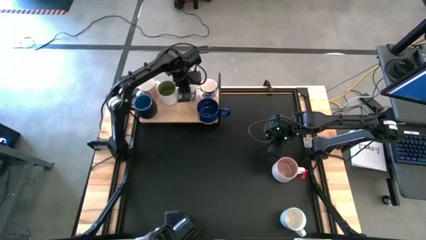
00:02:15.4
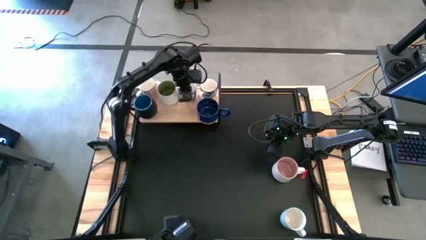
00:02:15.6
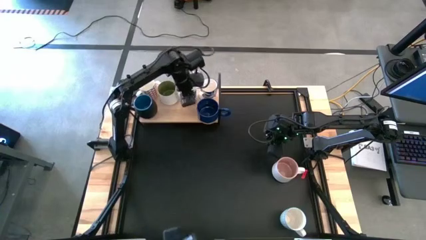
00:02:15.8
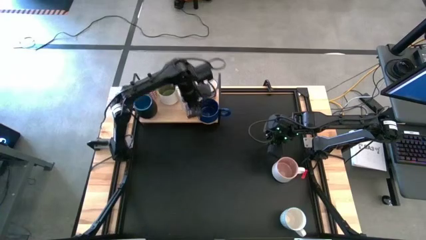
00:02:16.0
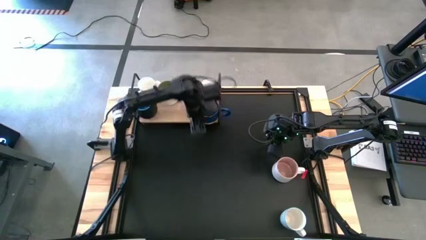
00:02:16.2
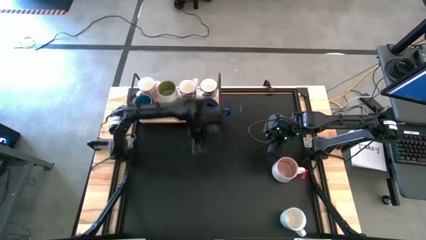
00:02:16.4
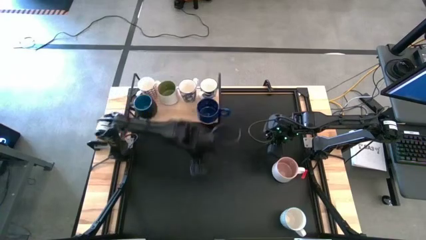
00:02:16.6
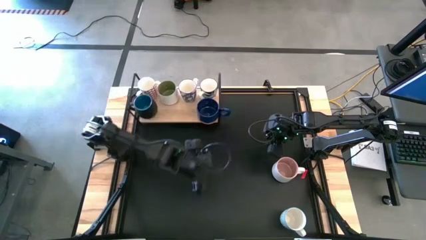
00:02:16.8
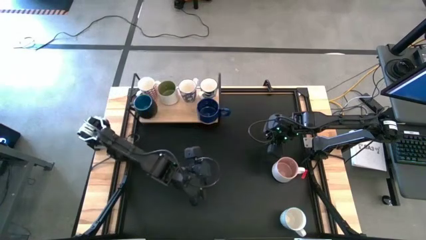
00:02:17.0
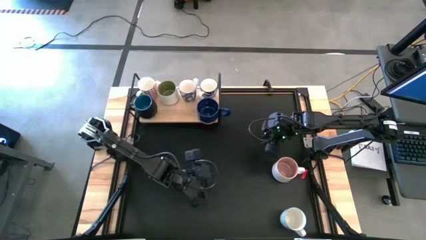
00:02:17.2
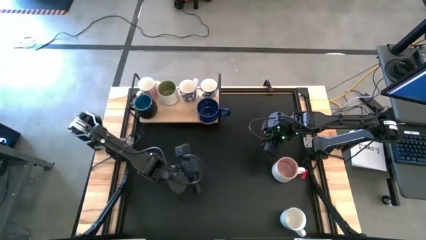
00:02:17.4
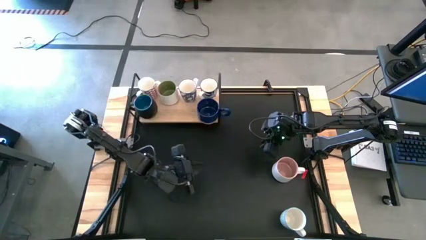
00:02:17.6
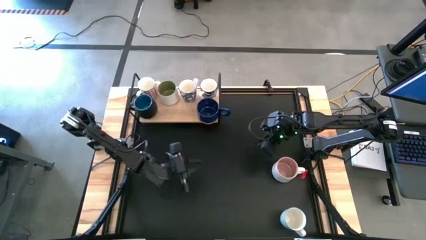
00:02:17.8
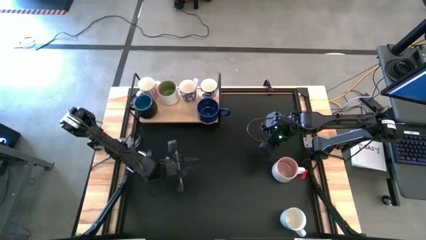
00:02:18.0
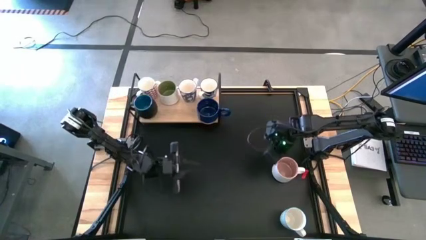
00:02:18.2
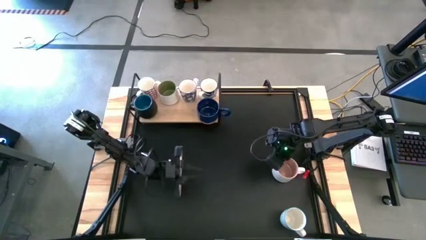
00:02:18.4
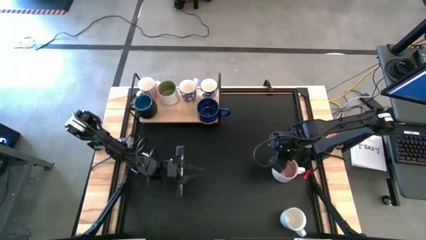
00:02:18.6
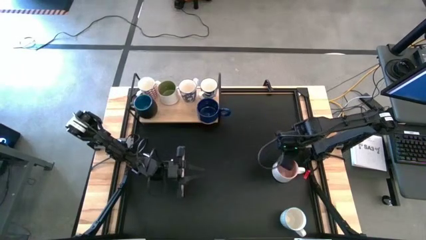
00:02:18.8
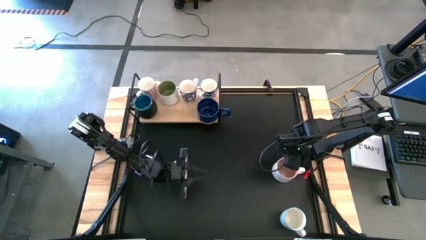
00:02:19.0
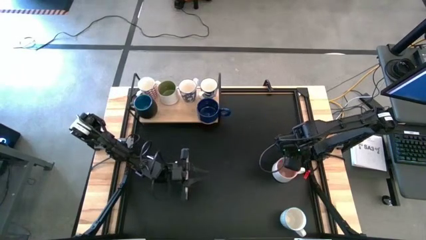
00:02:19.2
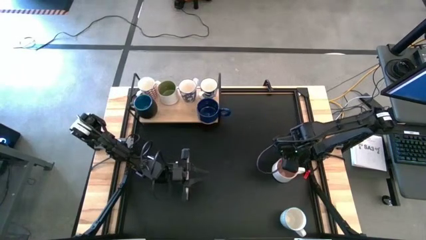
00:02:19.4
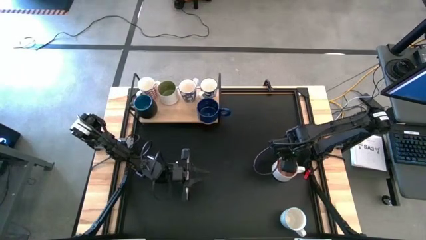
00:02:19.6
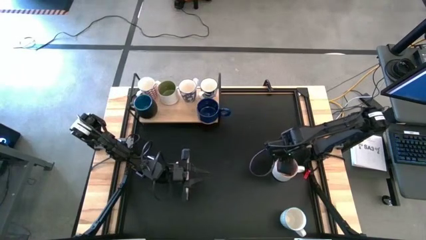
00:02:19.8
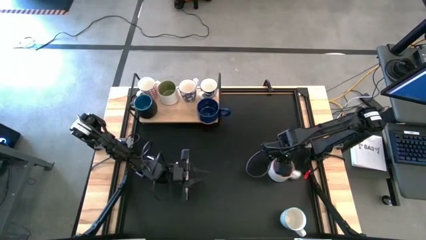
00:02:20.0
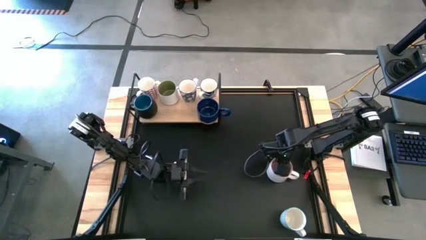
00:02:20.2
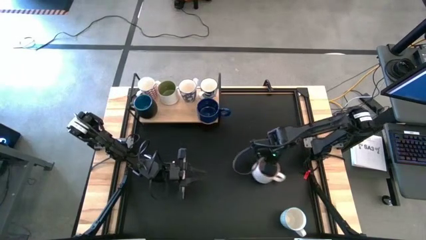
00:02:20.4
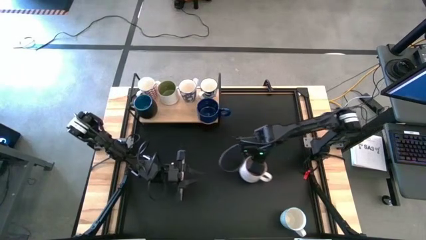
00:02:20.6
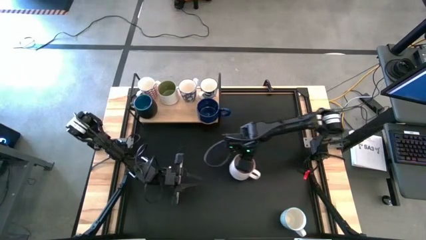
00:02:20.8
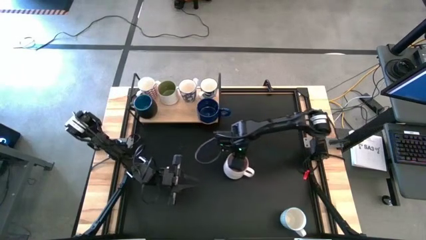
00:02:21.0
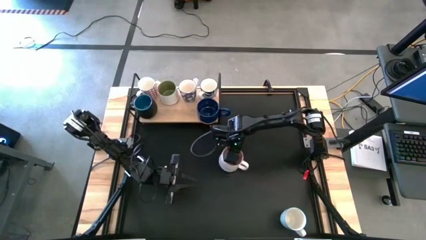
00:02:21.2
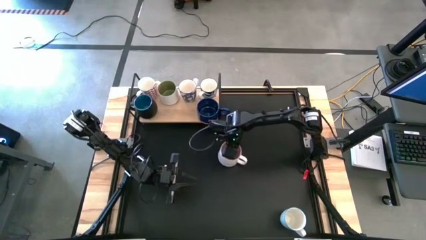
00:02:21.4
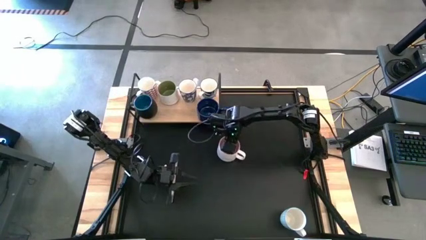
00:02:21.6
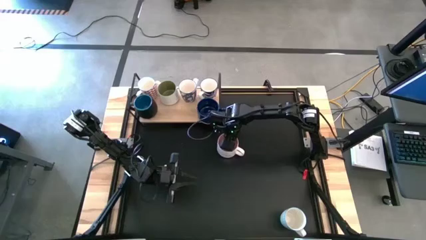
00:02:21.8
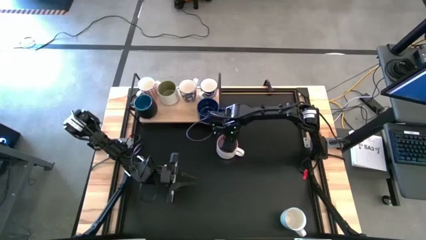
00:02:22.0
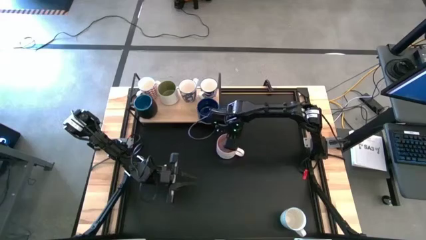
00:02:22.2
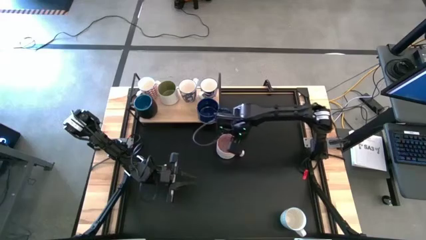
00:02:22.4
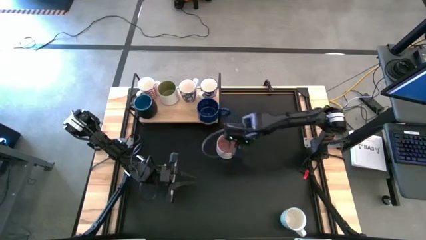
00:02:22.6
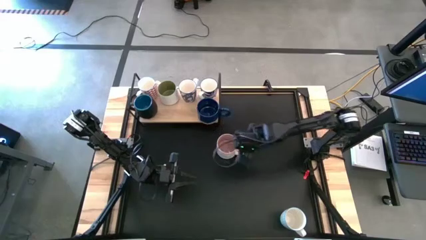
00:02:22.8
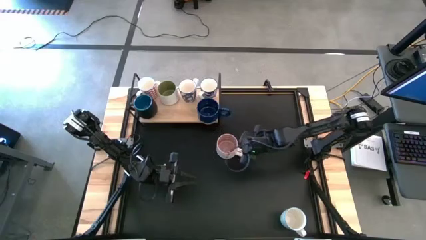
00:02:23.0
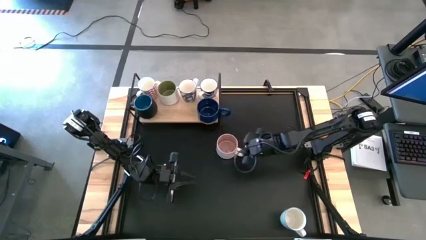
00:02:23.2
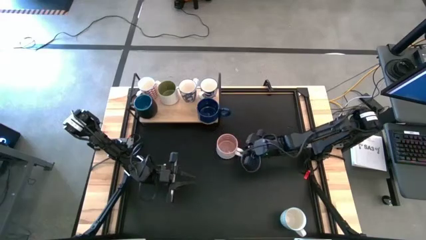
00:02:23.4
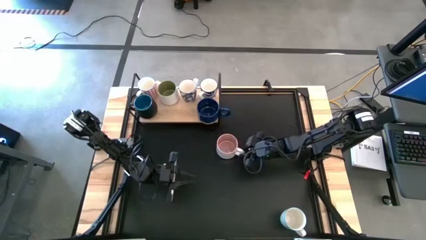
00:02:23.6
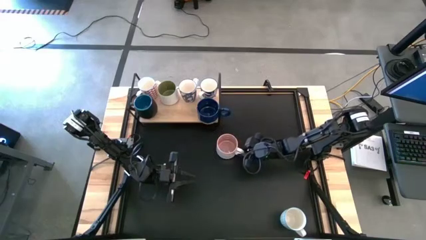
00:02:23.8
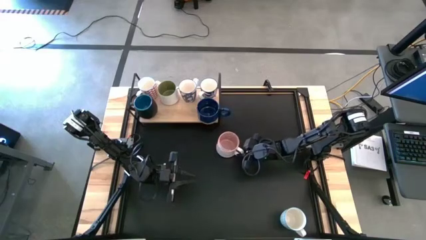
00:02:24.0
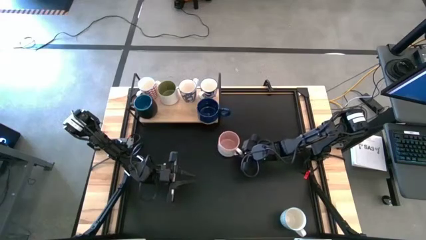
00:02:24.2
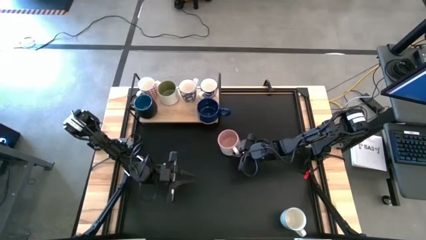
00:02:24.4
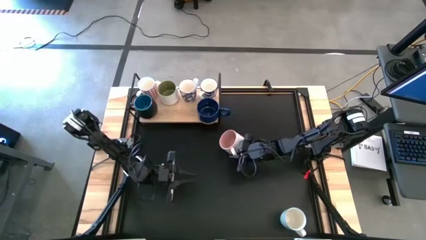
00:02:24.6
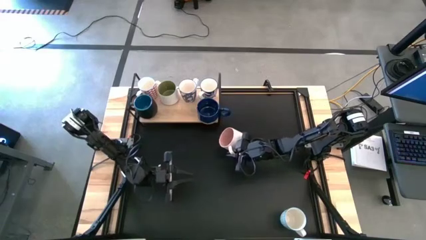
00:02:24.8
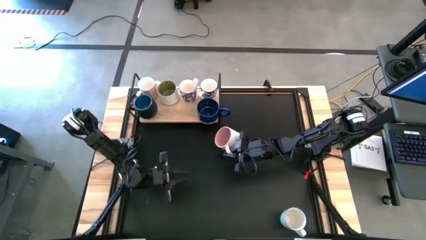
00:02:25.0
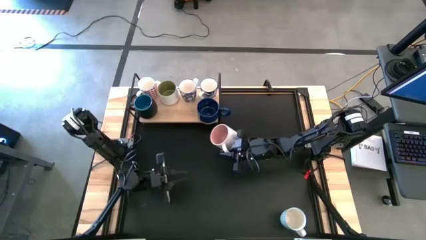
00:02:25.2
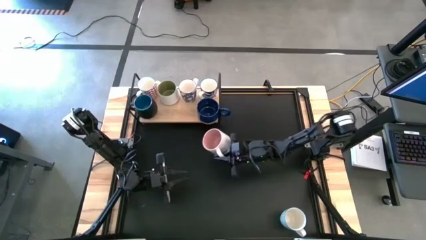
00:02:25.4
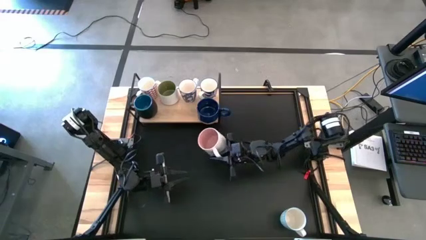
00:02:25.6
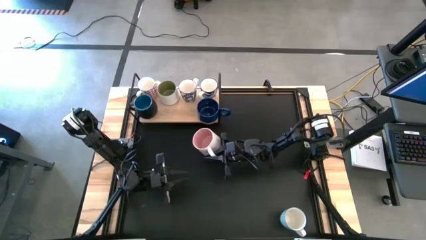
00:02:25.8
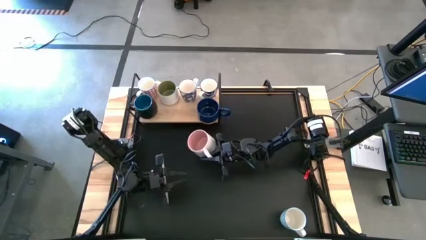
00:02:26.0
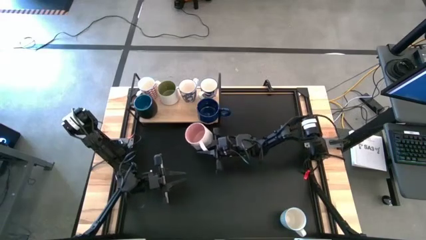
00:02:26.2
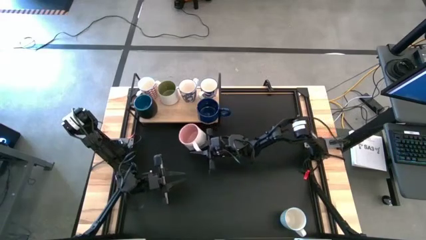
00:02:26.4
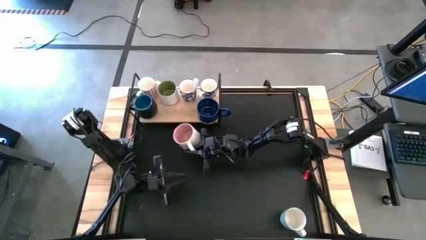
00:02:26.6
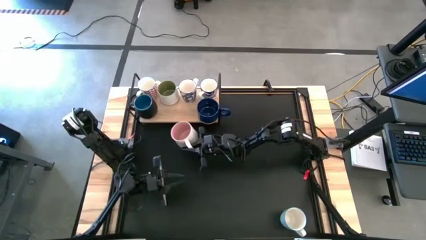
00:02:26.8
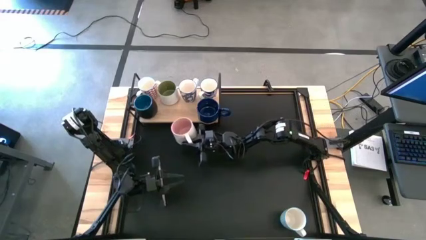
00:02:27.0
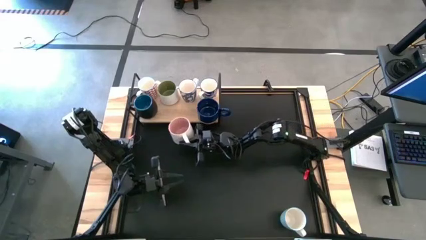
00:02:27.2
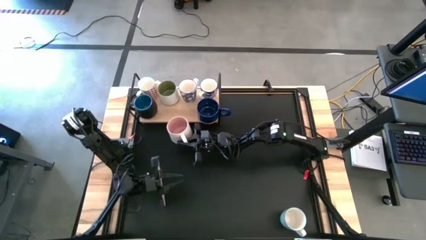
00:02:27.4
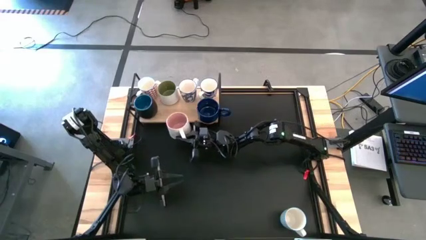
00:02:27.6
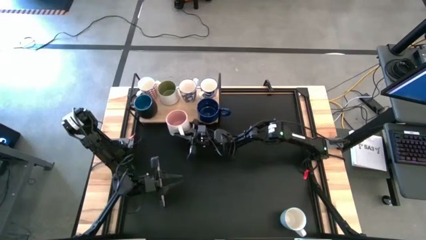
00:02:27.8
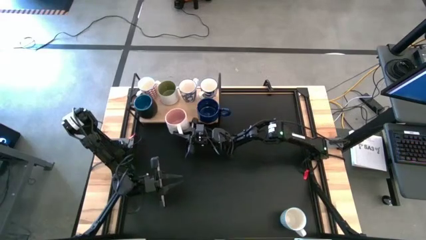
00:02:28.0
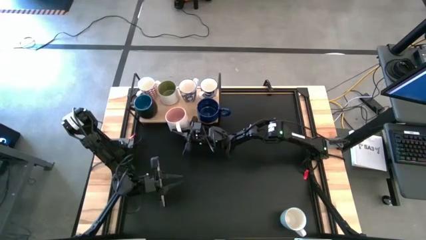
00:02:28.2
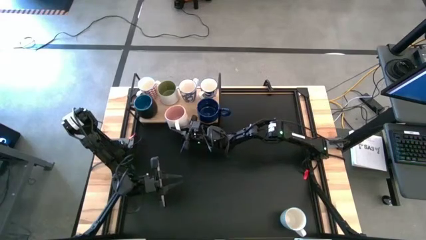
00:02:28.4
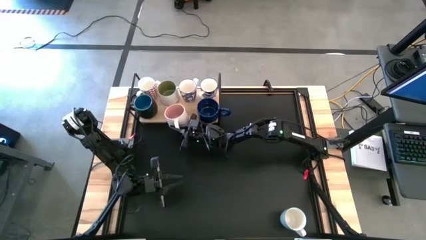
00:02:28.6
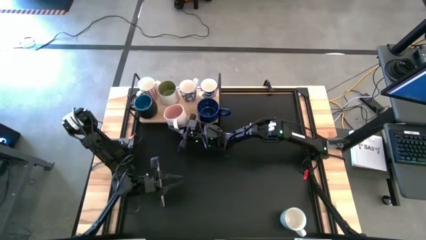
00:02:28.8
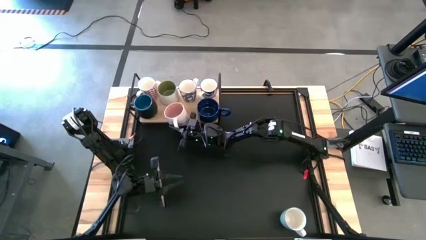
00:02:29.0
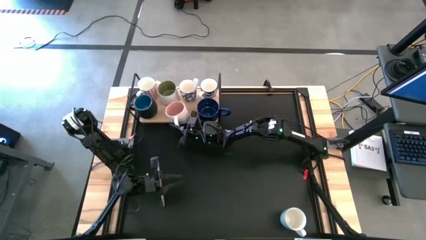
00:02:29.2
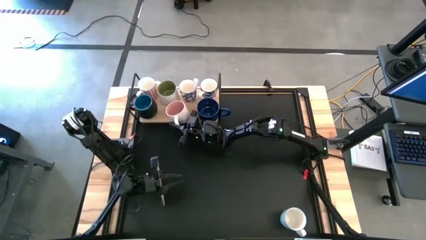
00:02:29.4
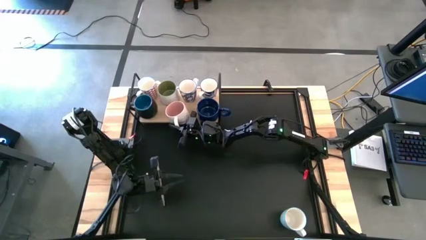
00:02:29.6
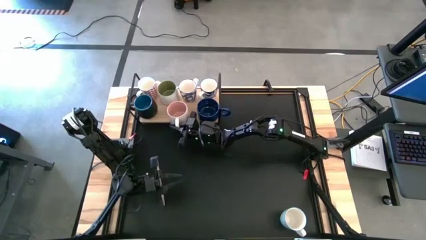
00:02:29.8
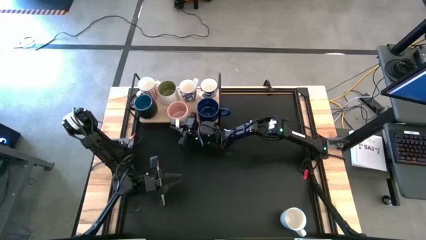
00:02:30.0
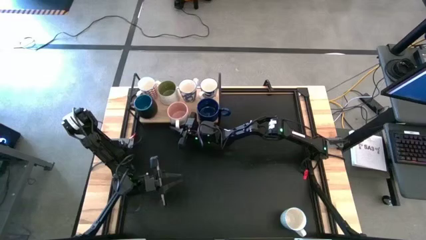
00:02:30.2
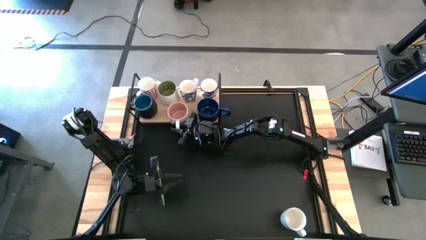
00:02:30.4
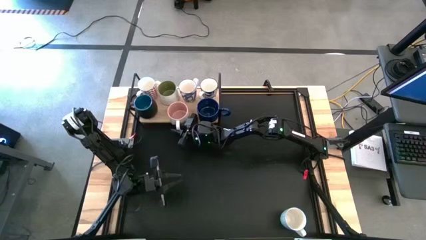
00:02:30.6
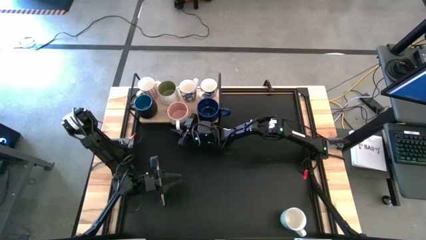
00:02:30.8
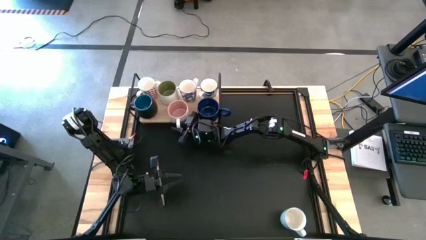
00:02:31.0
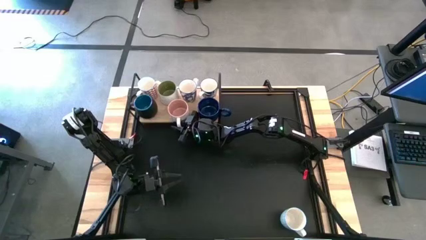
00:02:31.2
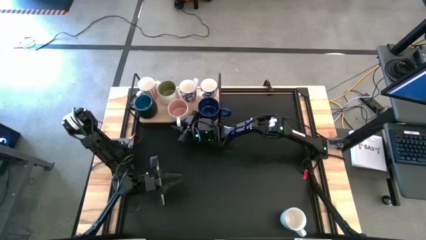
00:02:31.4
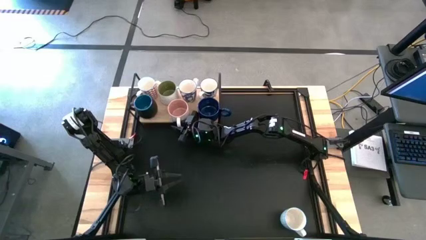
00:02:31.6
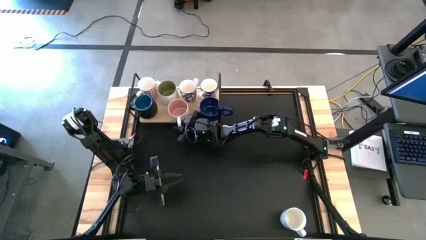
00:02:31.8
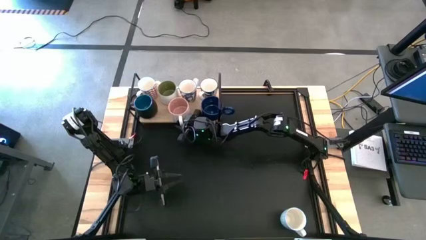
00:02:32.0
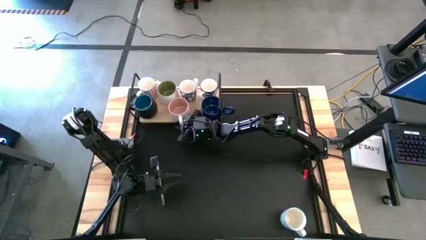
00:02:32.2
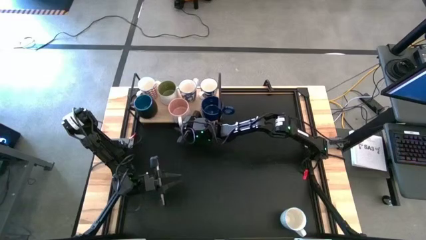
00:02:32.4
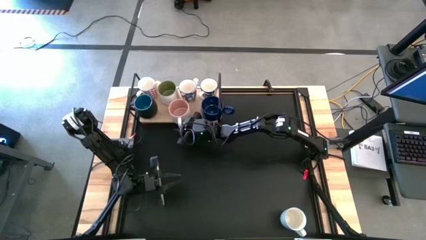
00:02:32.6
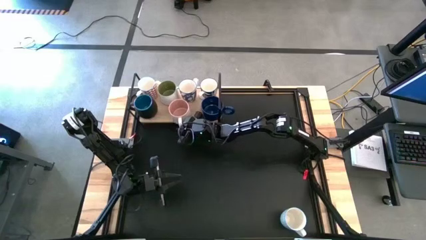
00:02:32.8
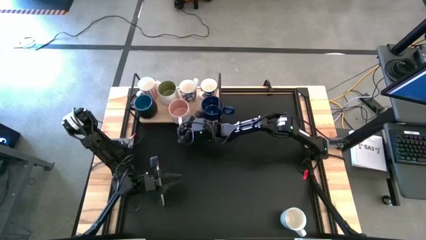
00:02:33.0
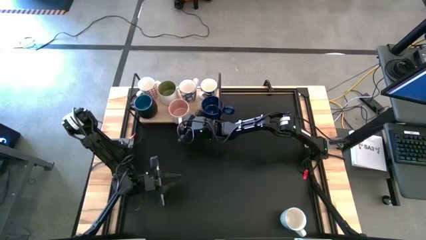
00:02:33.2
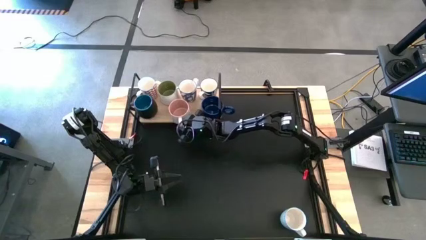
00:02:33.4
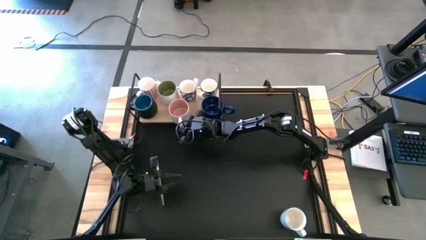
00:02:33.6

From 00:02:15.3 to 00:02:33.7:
Task: Place coffee mugs
Put the pink-white mug on the shelf
